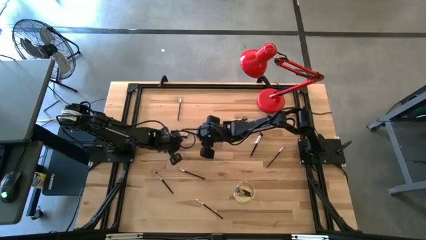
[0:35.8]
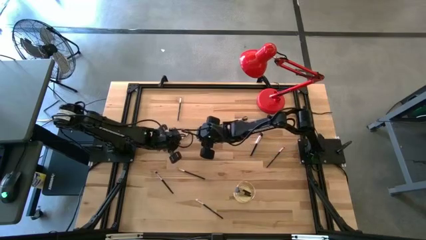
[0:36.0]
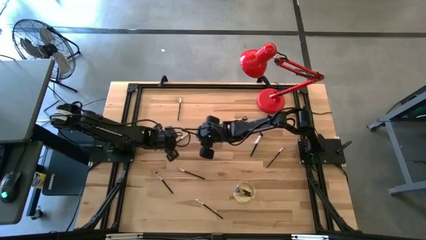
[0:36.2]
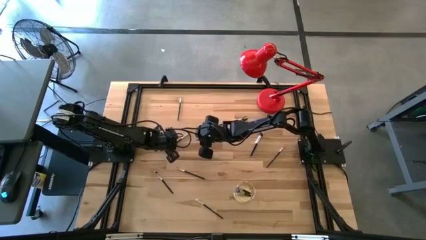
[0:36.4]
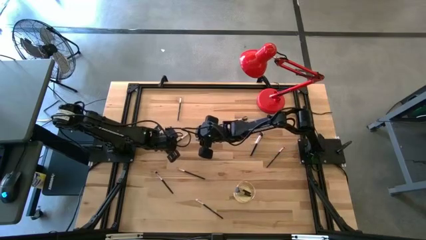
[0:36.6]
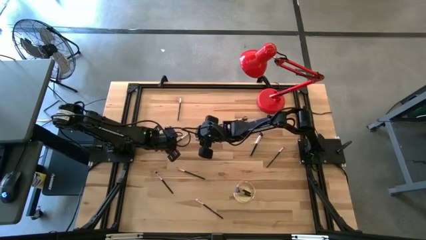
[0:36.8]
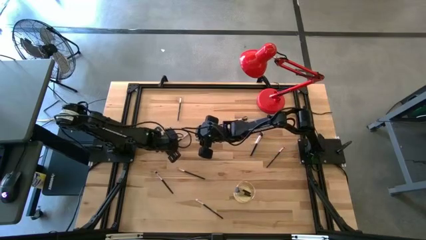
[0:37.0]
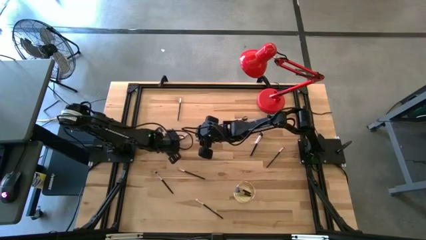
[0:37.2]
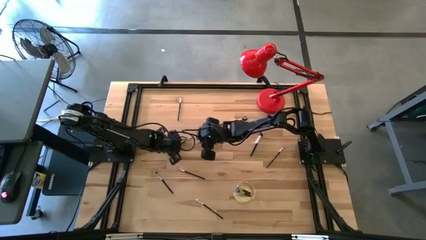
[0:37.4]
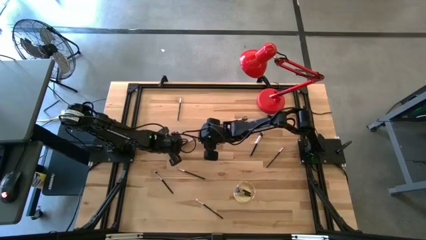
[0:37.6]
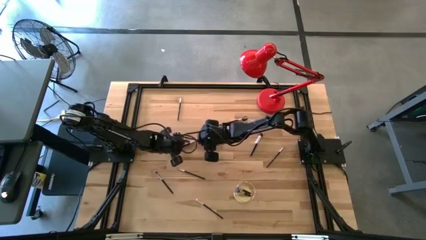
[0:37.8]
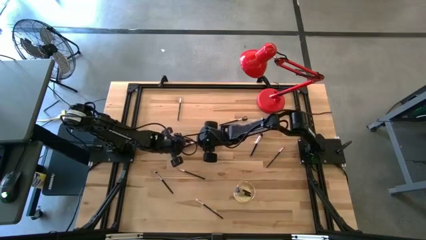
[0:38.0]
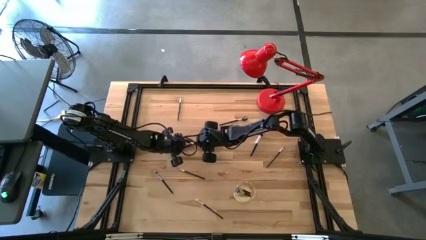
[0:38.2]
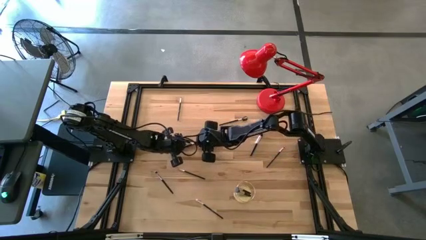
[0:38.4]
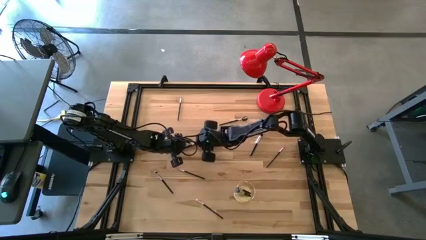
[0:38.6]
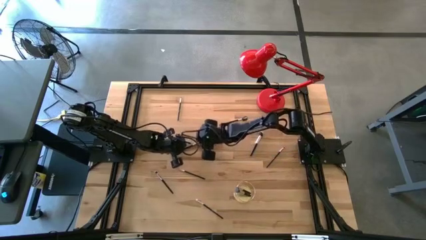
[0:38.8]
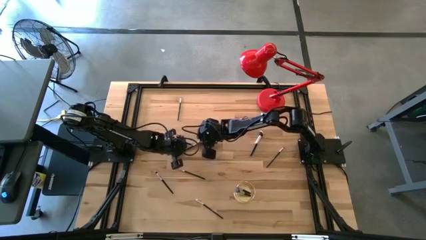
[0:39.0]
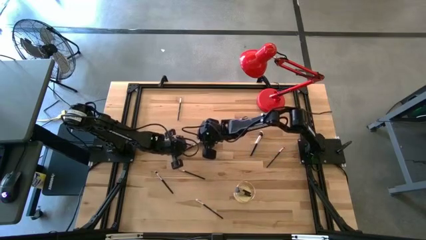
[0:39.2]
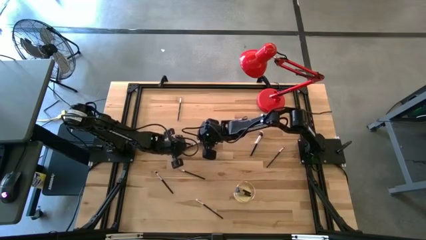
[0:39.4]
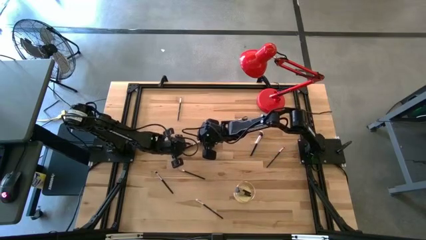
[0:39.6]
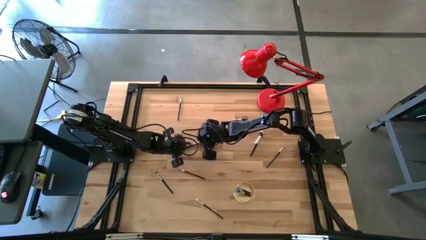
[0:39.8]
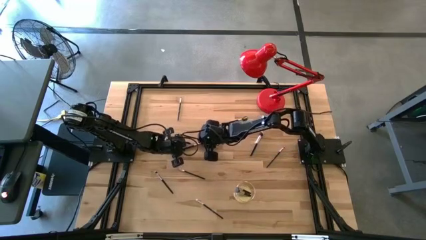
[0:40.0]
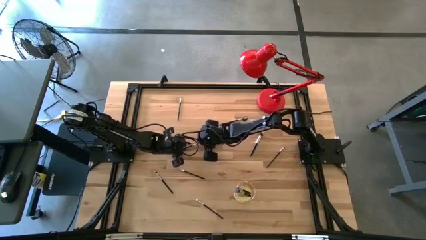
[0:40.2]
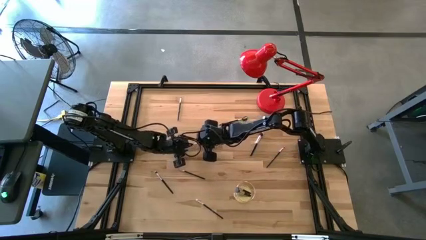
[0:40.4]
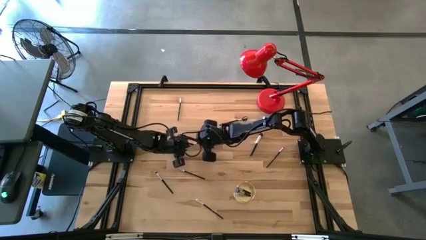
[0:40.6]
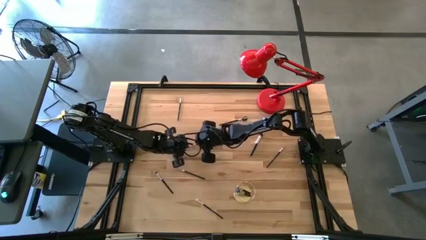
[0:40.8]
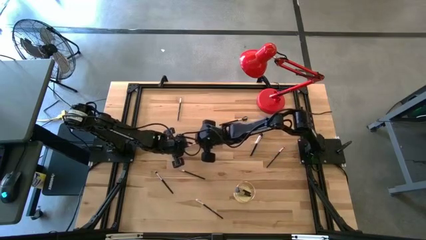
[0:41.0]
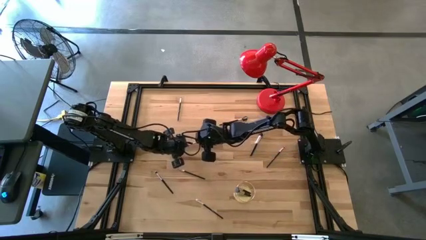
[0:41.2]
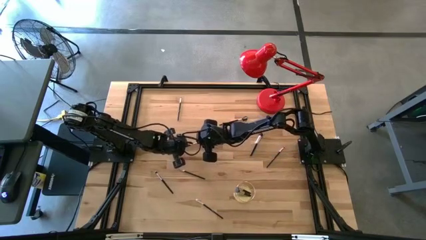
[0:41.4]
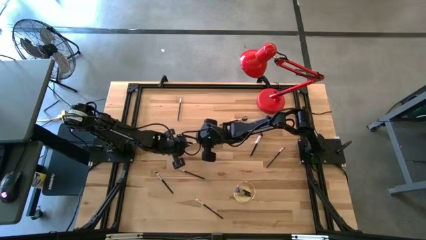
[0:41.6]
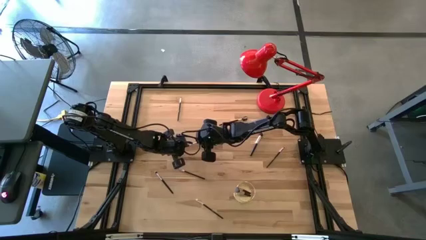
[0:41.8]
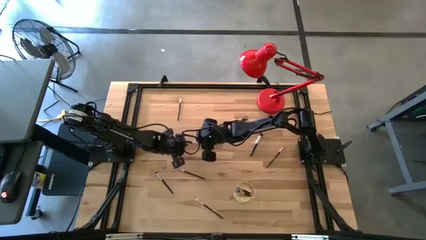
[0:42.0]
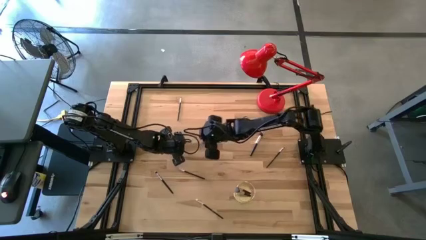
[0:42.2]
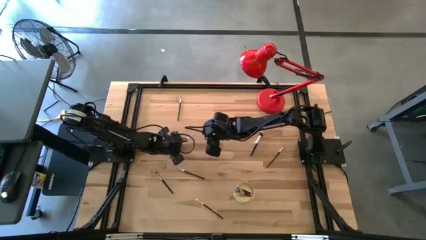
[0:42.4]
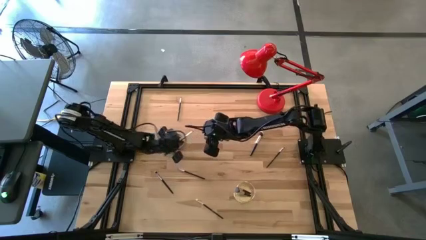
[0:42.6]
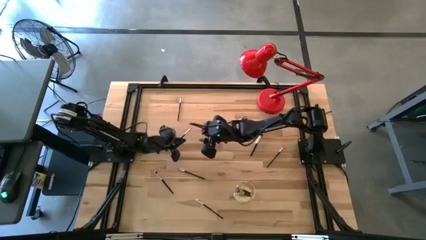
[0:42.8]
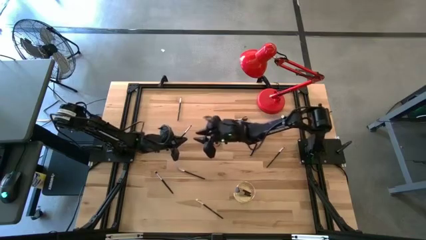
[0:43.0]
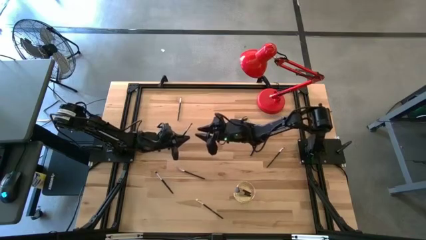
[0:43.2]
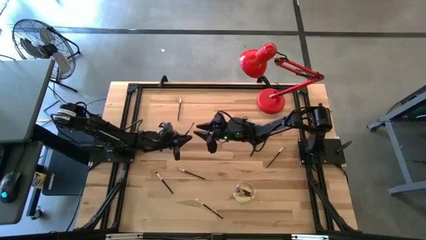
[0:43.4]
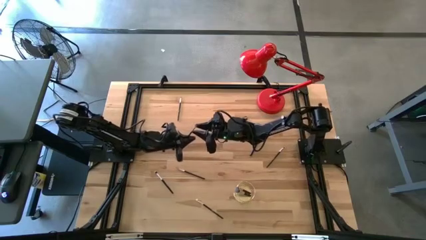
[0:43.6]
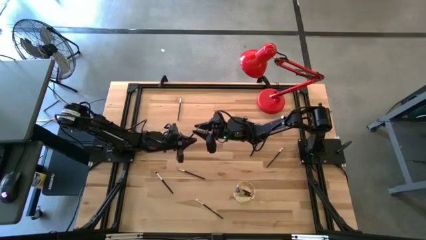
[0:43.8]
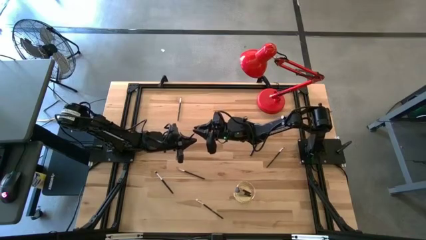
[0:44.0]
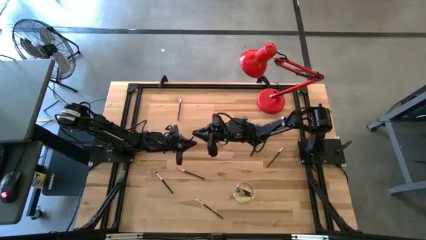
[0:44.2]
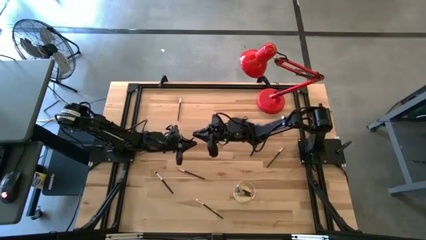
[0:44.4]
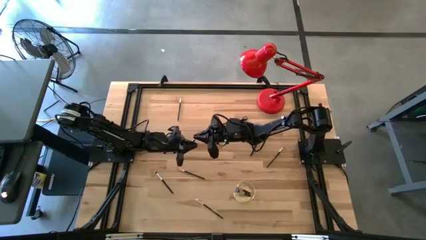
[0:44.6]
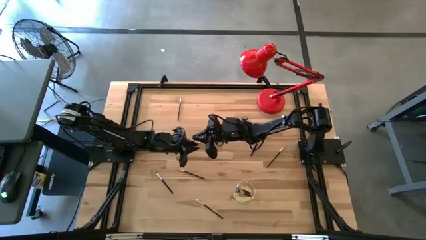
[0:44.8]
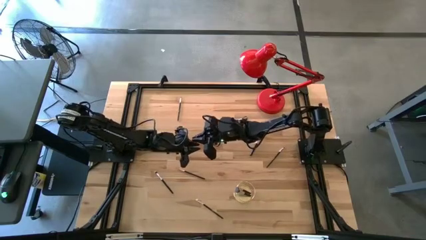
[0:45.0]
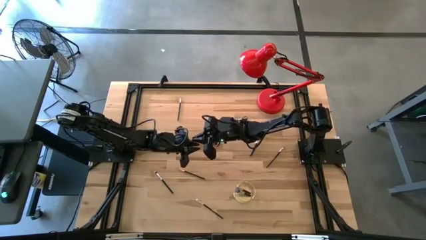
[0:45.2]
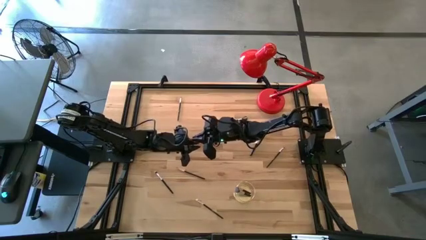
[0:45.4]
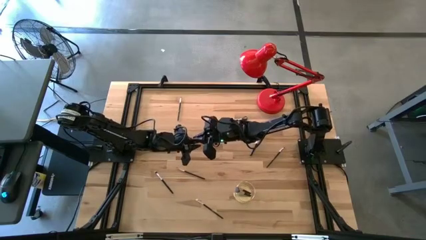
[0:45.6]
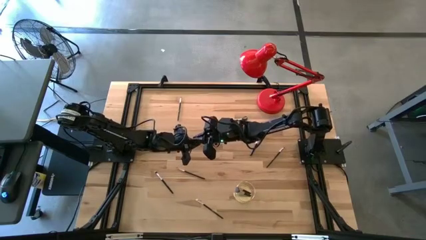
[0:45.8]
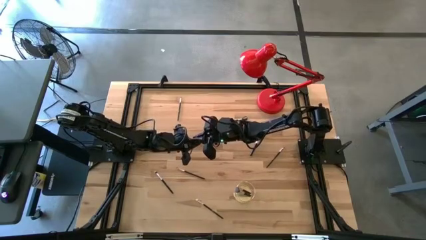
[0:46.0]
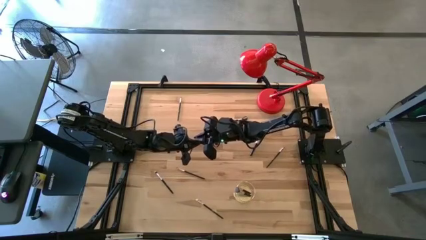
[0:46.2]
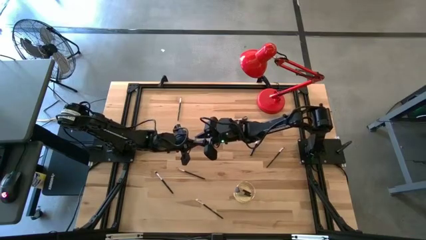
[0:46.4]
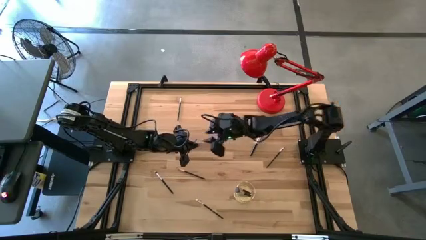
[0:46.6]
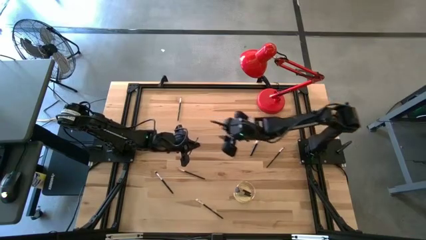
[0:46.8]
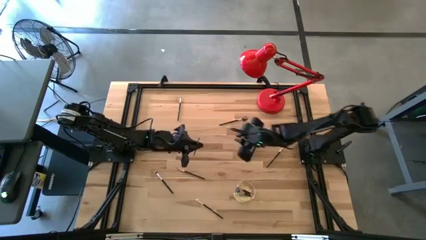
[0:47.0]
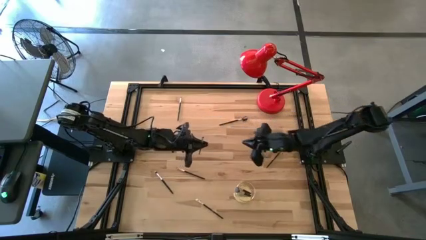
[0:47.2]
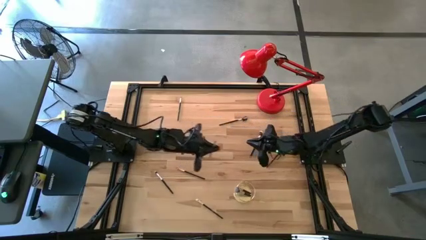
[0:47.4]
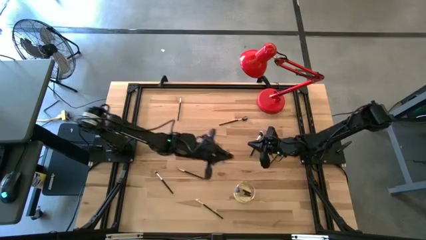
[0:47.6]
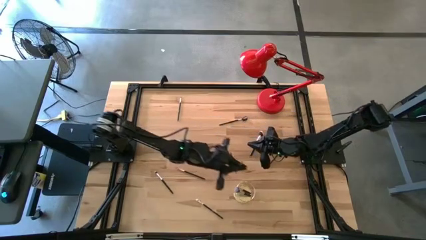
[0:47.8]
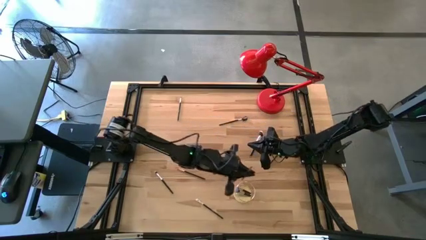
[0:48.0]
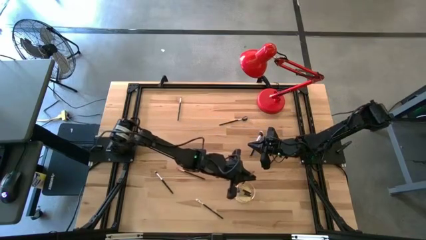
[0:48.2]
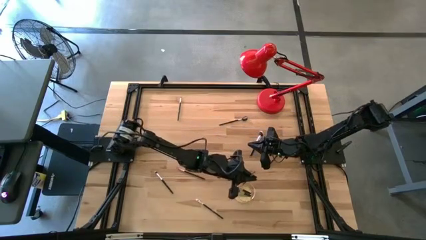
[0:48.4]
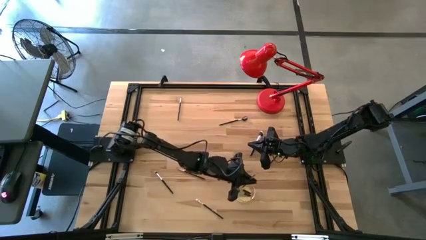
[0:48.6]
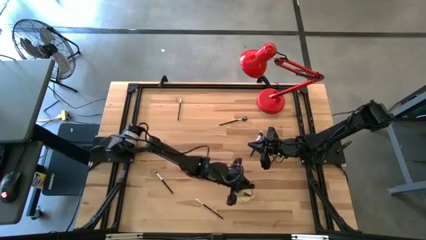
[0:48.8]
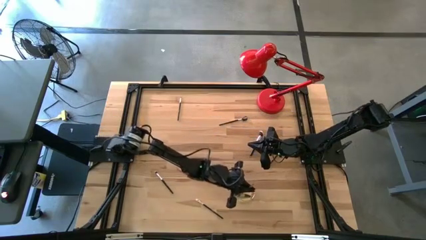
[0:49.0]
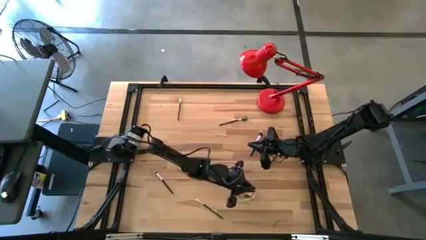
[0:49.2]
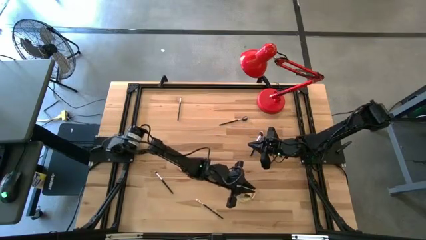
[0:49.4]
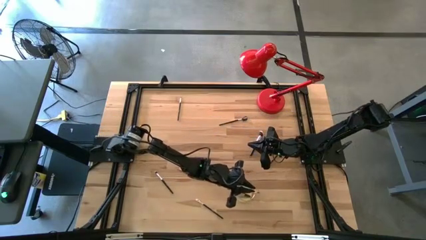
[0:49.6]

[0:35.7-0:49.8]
Task: Pick & Place Makeup Brushes
Put the eyeshadow brush into the gold makeup holder

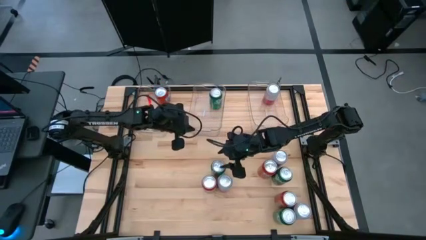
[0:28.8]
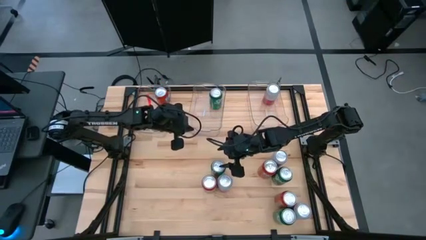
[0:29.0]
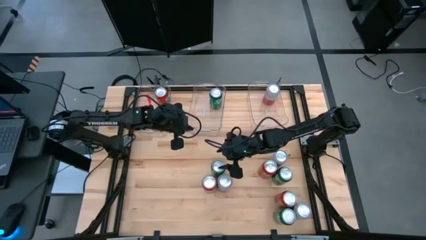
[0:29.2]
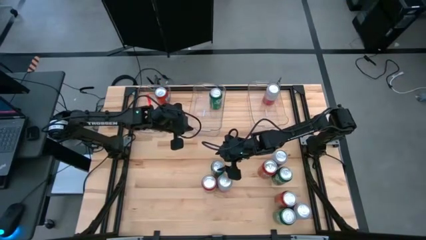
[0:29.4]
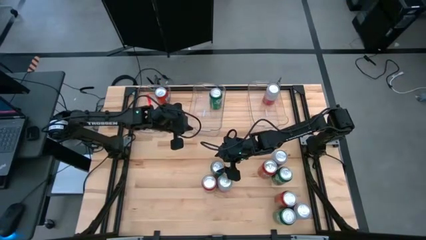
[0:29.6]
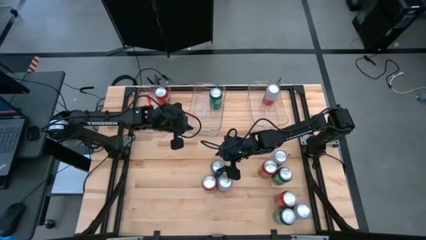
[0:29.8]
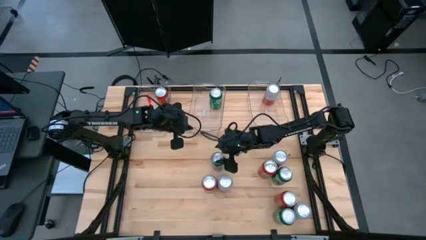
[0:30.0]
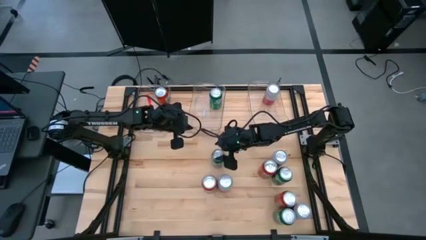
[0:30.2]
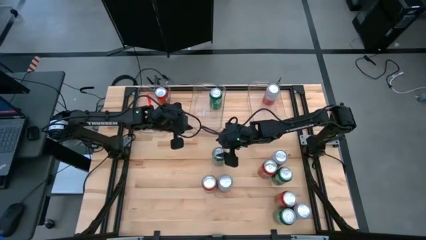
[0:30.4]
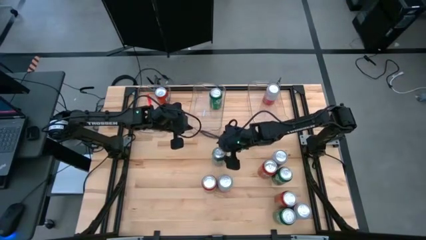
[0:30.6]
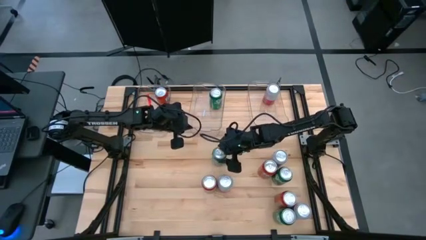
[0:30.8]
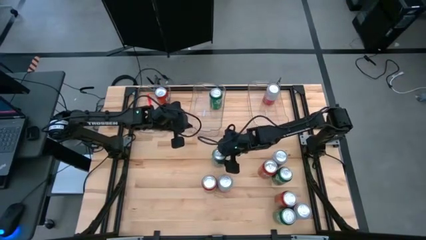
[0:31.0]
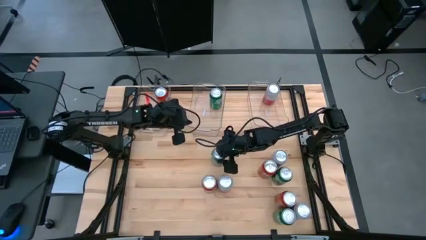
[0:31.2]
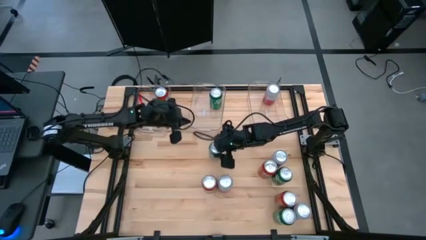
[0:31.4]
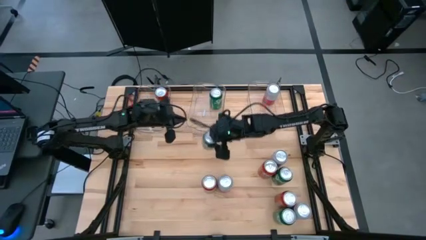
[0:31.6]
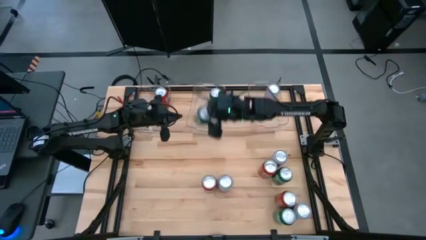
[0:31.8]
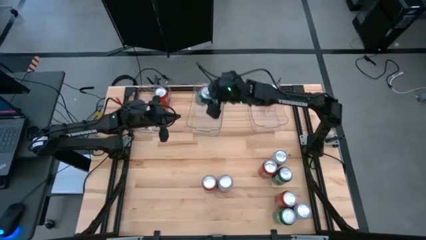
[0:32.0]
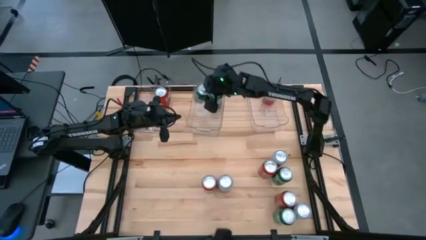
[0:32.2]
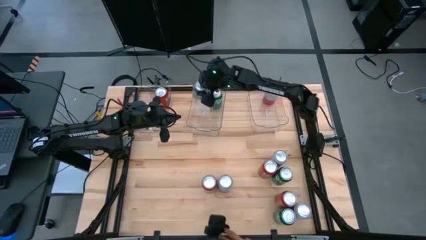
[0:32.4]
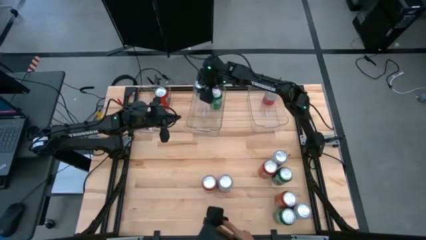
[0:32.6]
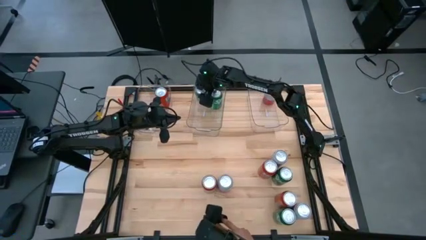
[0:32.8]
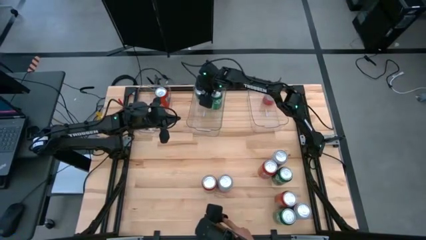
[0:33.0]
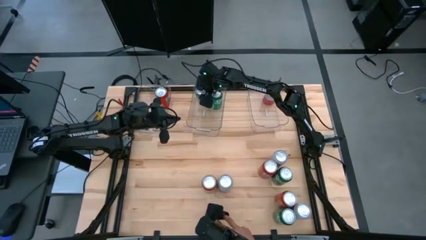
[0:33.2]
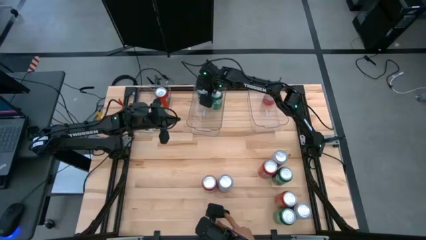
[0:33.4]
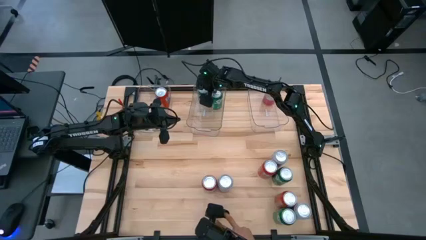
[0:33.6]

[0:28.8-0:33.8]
Task: Sort soda cans
Put the top left green soda can into the middle transparent bin
